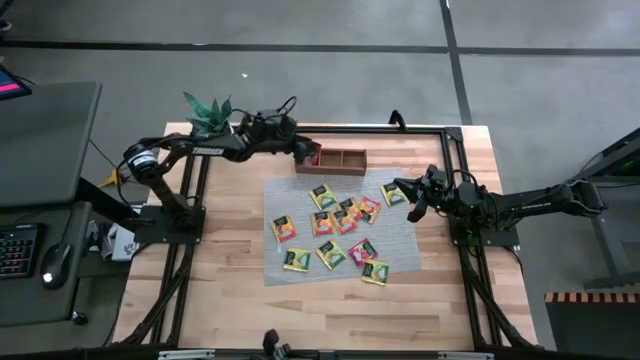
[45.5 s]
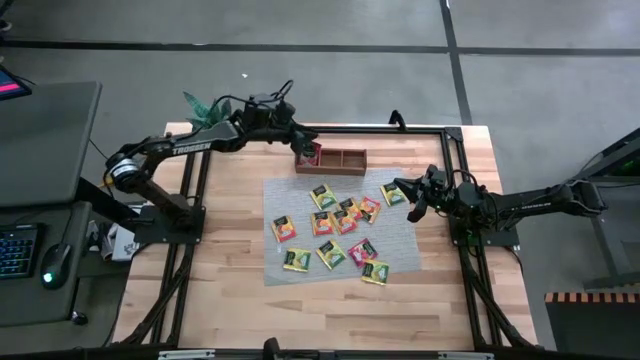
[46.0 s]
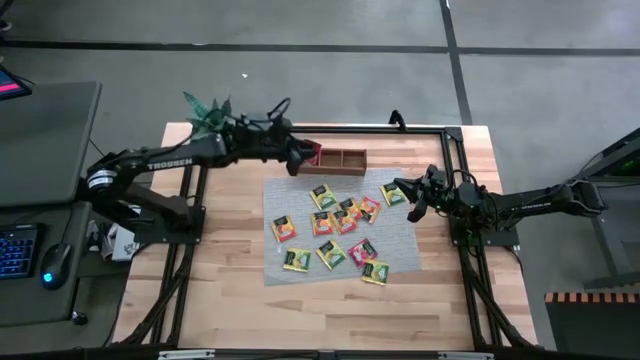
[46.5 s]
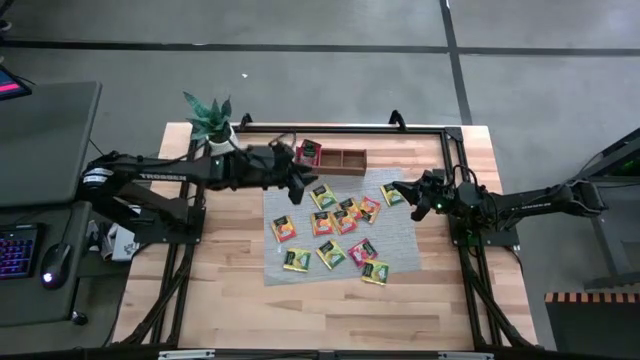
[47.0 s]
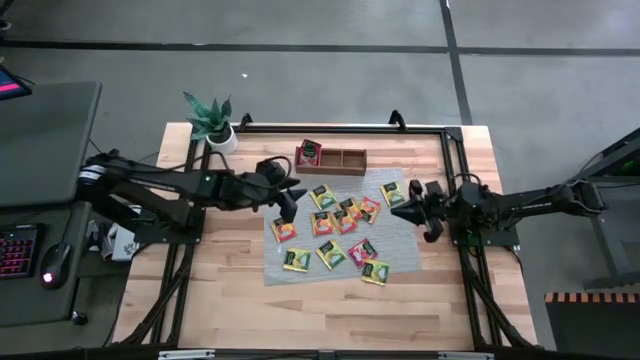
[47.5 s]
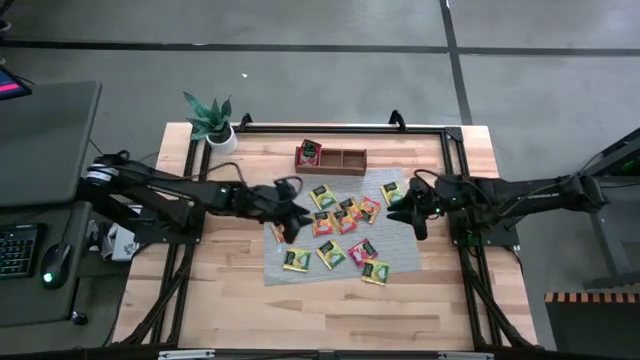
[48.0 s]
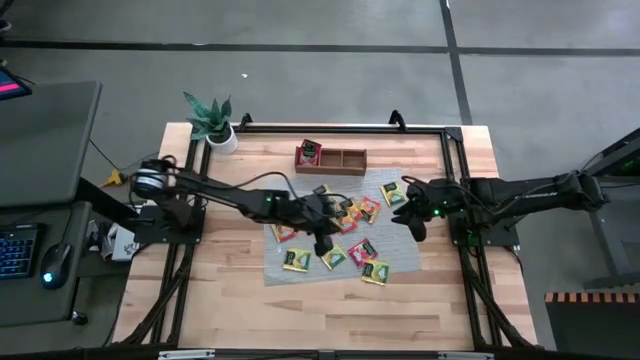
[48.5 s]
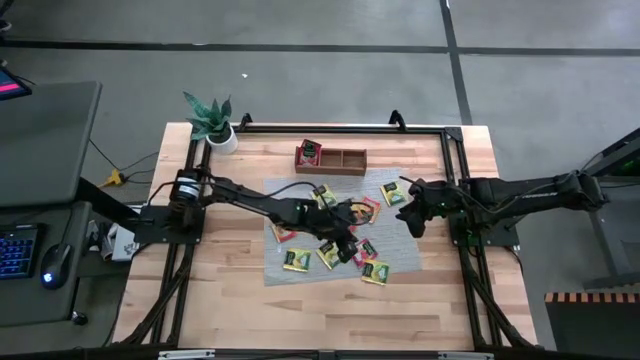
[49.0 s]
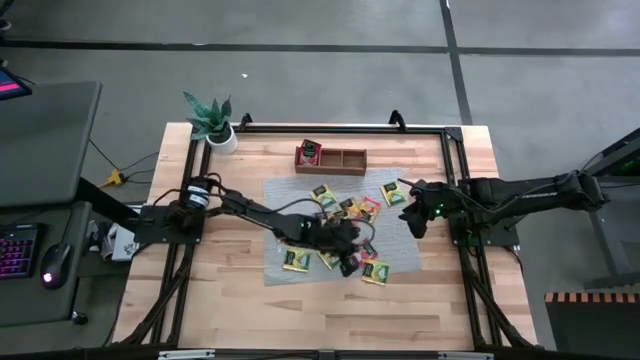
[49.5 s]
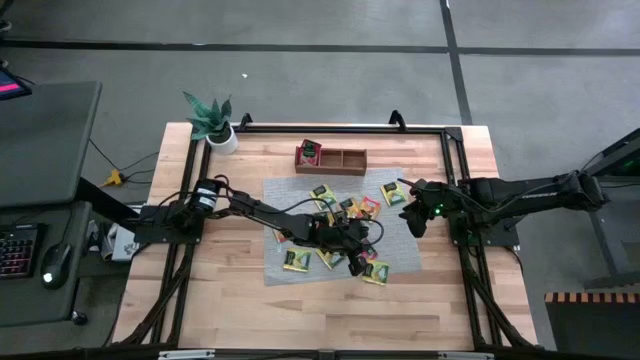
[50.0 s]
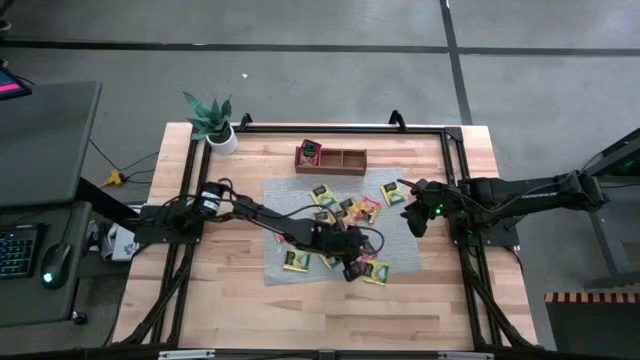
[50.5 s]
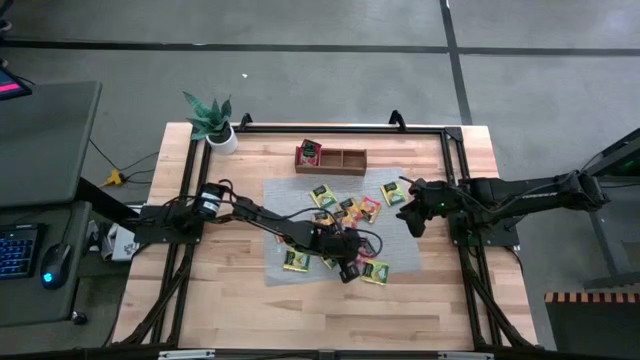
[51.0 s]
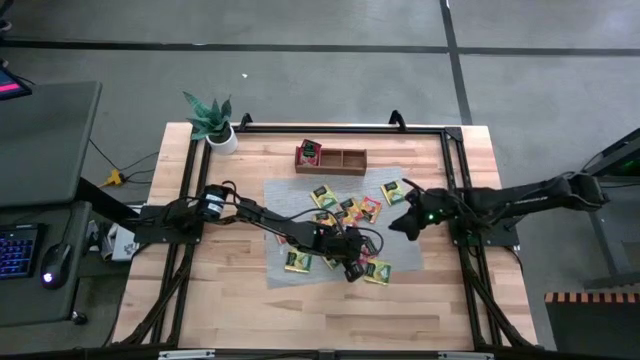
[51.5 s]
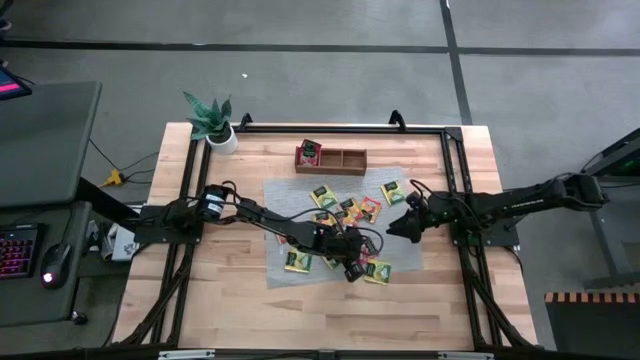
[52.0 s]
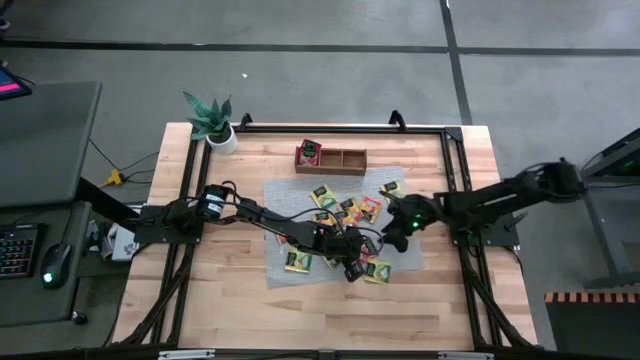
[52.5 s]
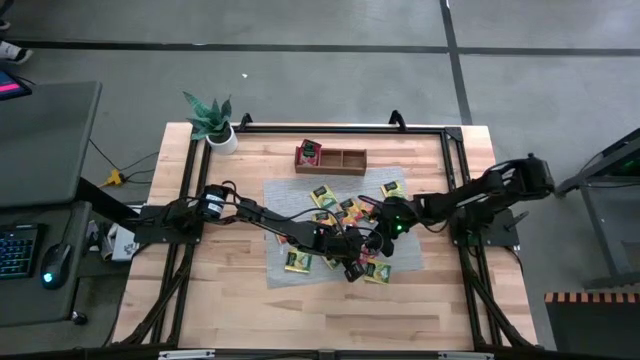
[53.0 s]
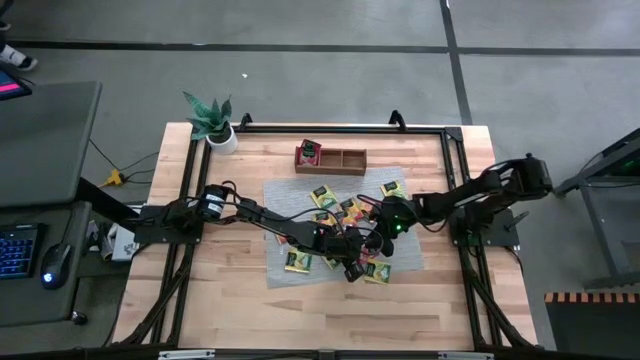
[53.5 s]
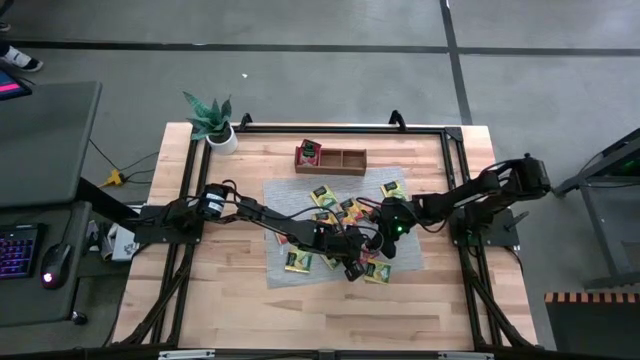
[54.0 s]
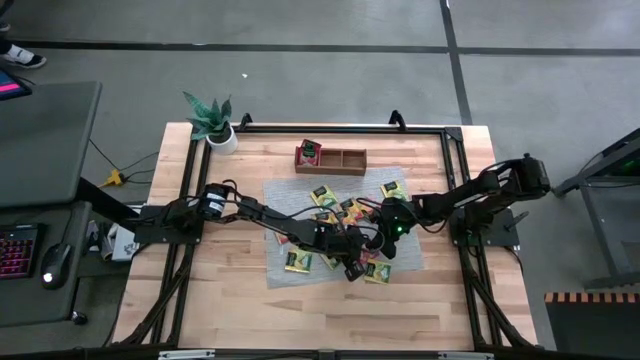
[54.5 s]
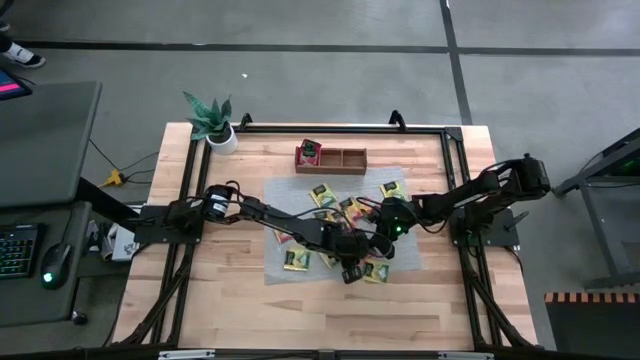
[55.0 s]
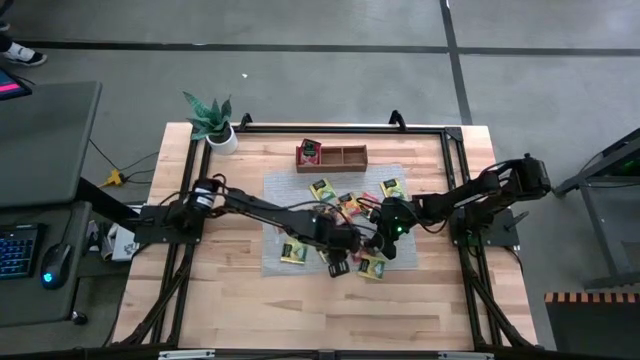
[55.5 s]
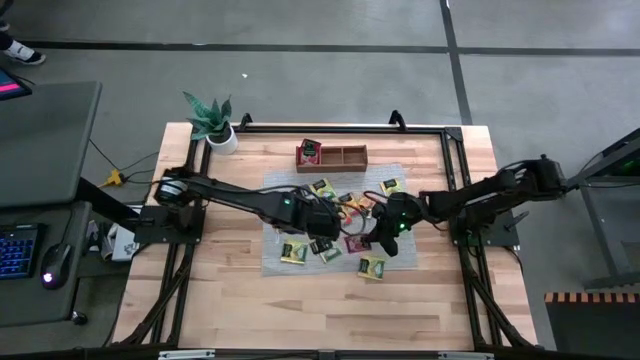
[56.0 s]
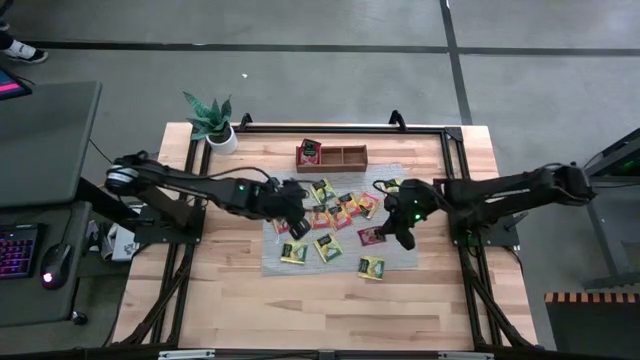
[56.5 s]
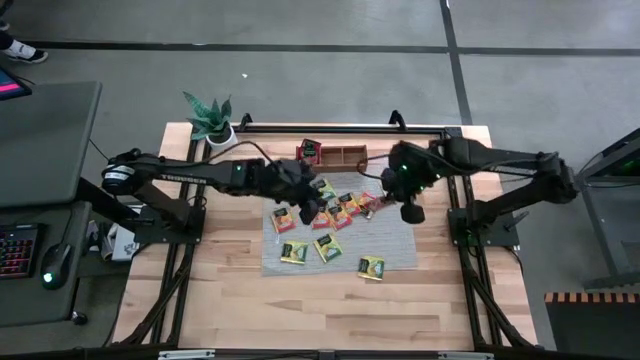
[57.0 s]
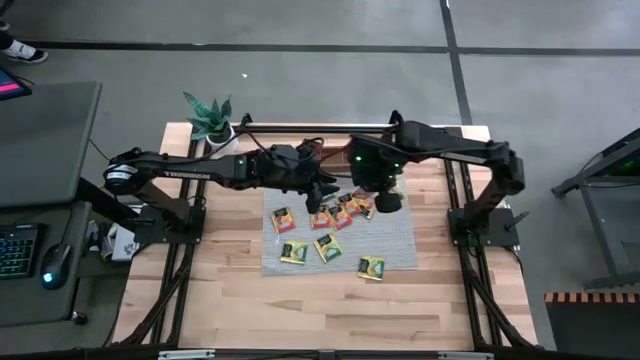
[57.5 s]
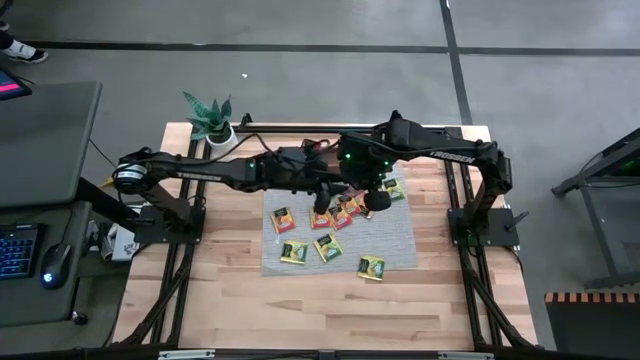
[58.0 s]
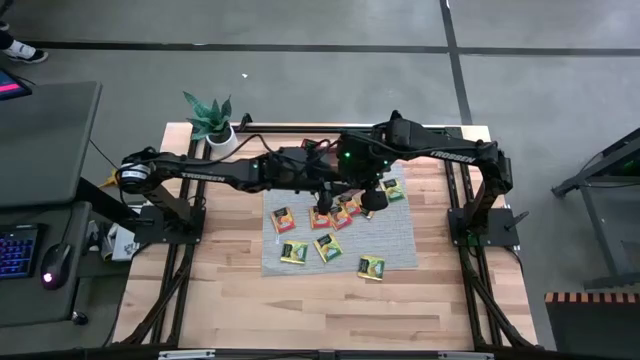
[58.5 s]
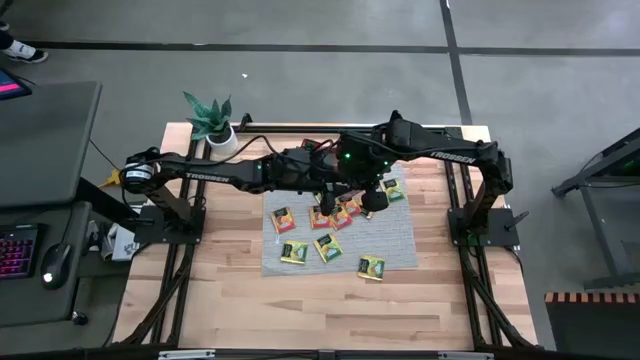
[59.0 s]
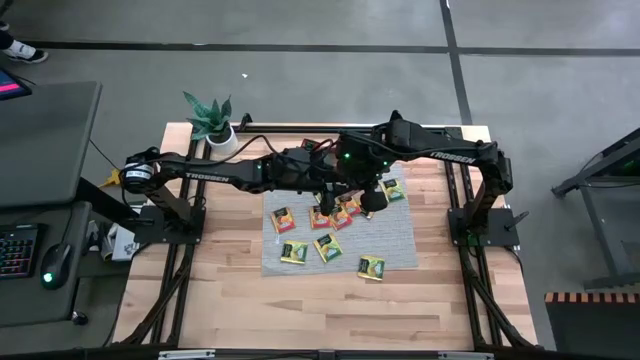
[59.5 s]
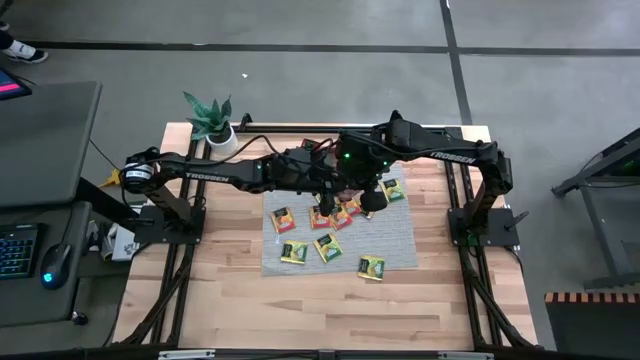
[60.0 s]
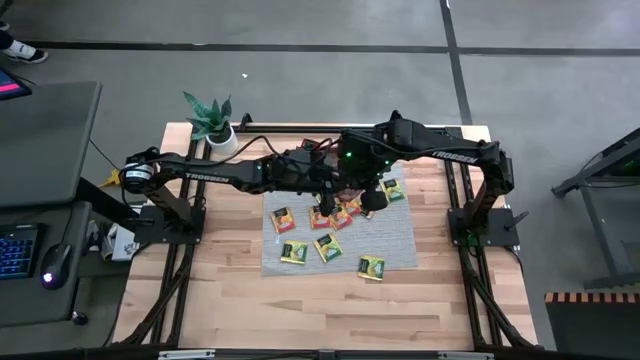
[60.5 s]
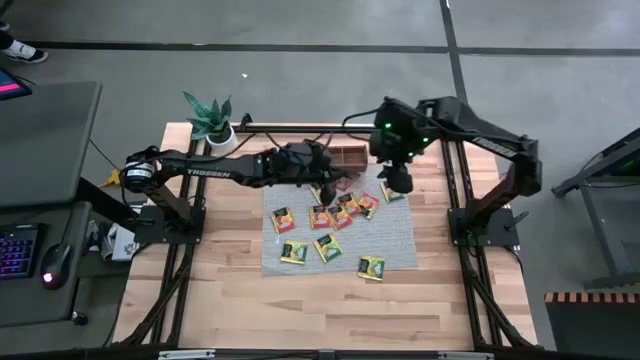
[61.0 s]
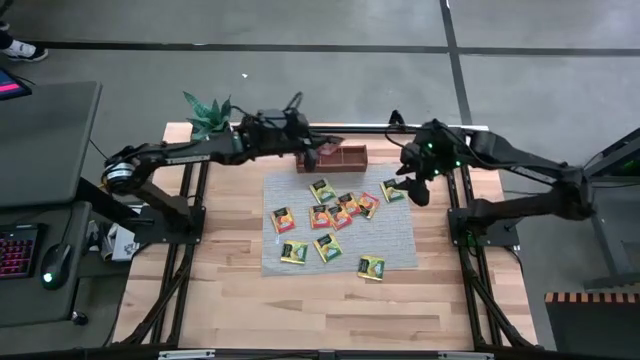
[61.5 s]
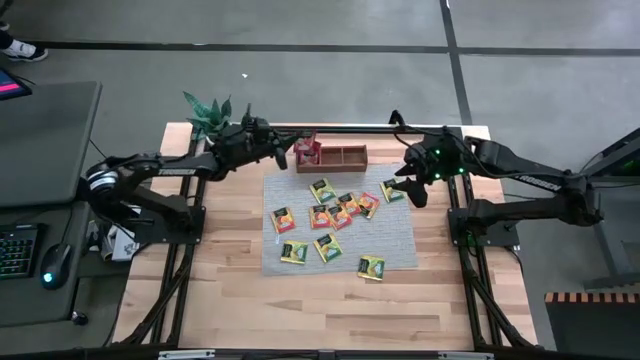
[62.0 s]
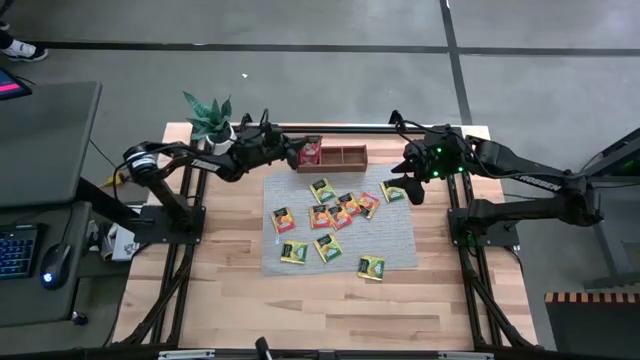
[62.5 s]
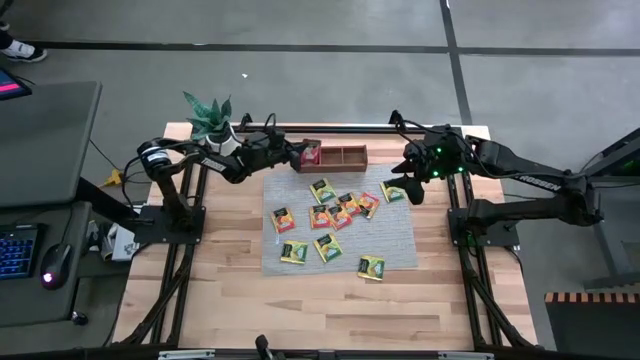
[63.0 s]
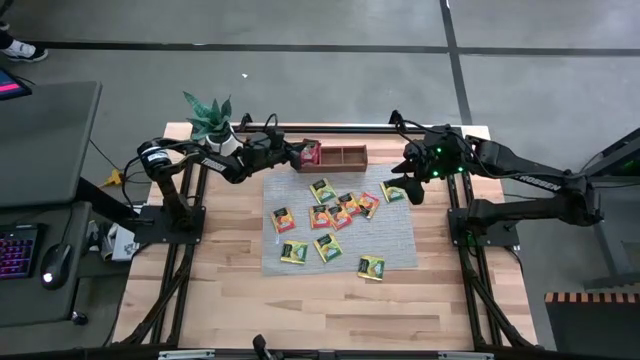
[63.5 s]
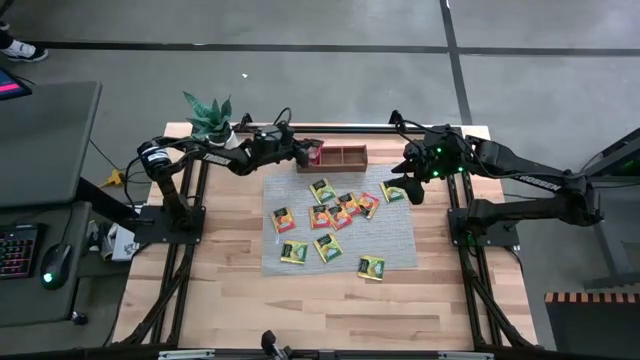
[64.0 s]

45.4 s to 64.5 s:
Task: Pick & Place Tea
Put the red tea bag into the left section of the wooden organizer

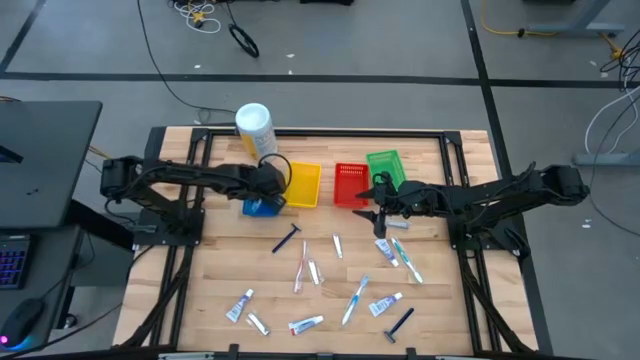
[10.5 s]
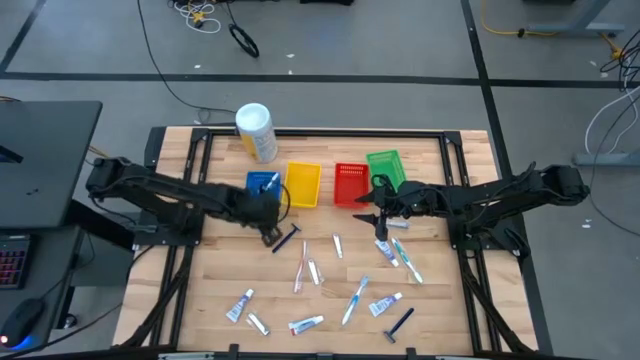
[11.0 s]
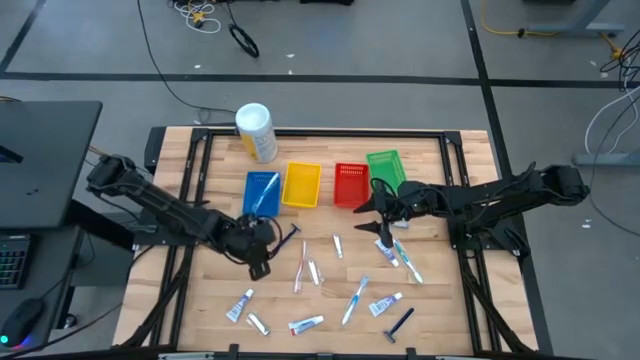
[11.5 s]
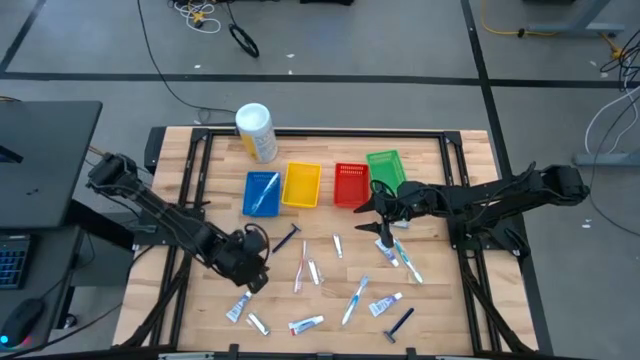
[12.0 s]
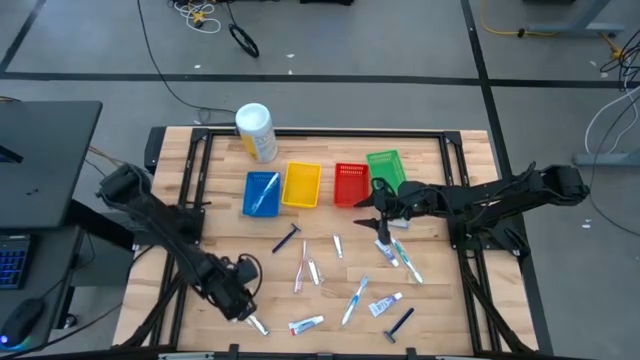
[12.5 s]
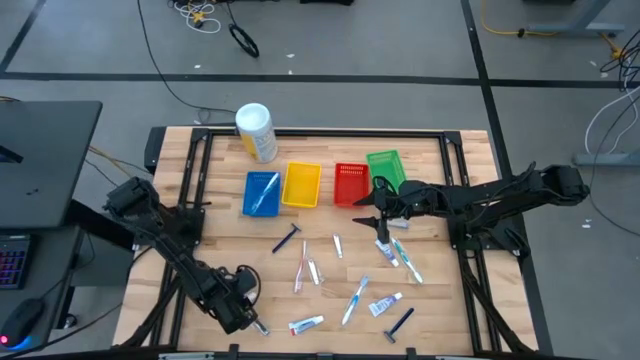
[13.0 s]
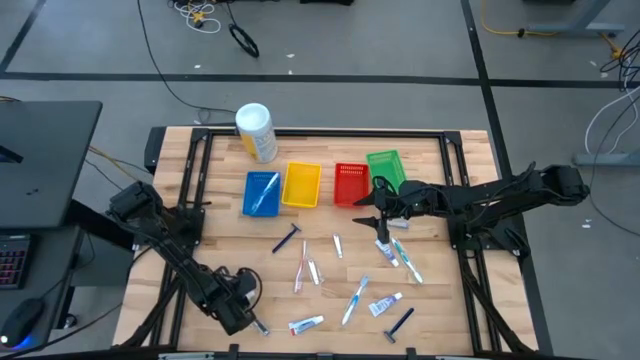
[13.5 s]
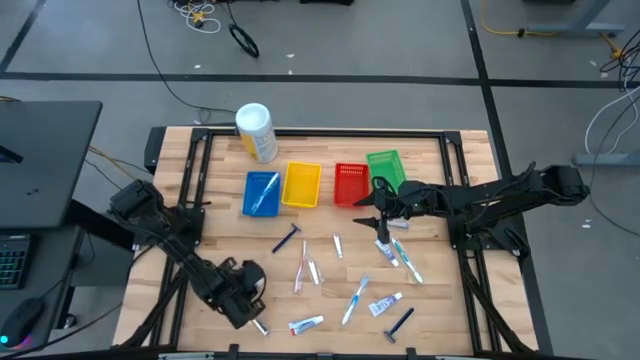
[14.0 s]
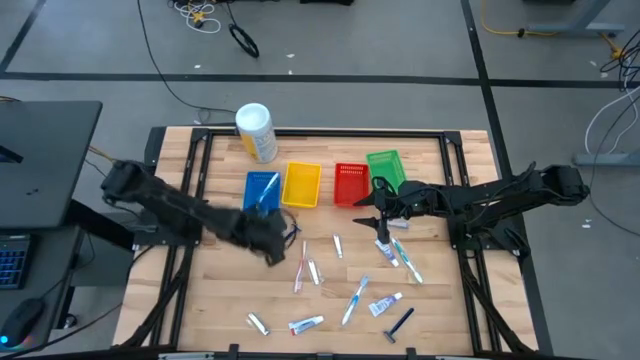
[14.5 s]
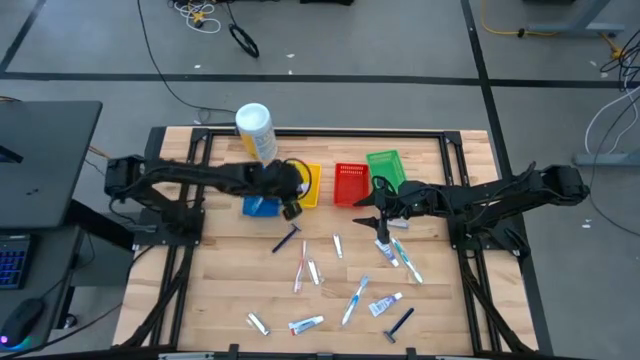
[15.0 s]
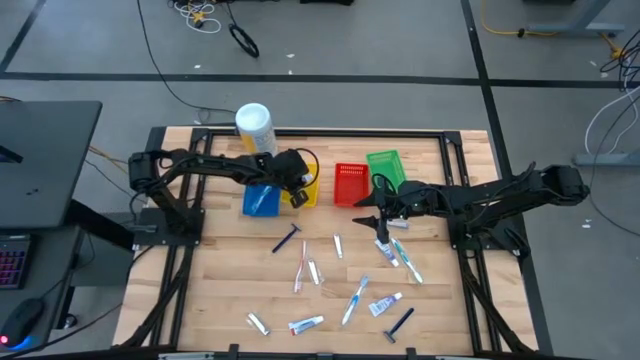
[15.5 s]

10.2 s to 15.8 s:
Task: Pick & Place Travel size toiletries
Put the white toothpaste into the yellow bin
